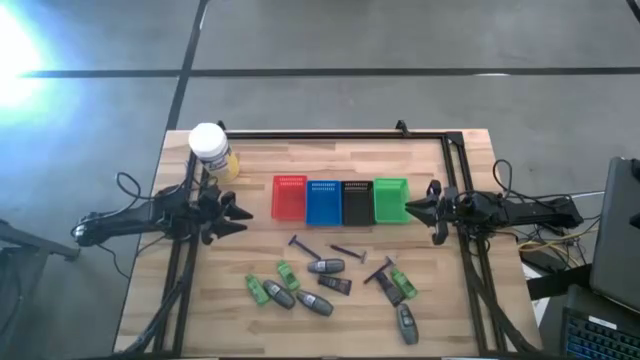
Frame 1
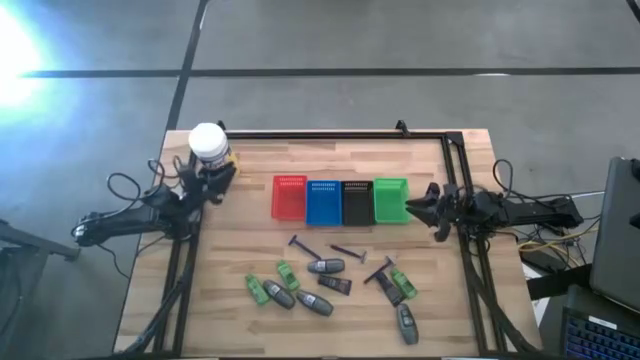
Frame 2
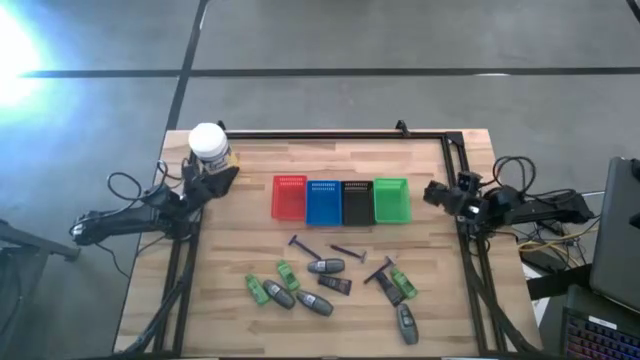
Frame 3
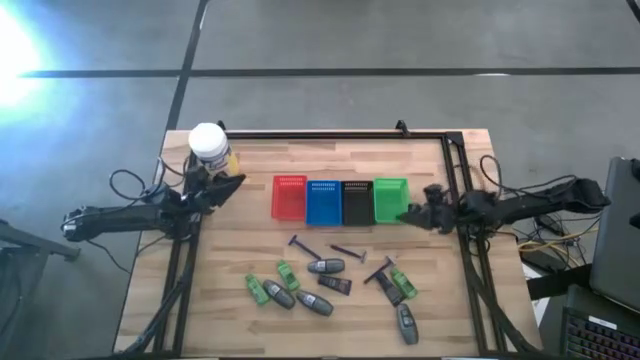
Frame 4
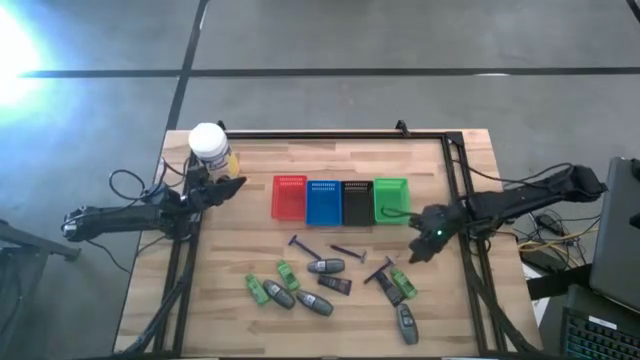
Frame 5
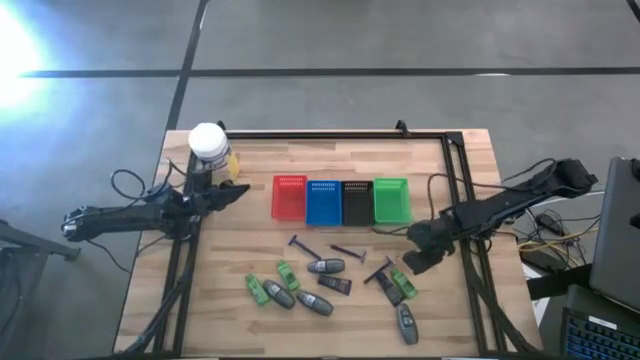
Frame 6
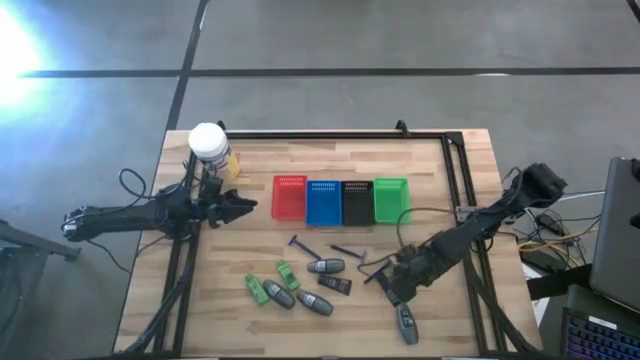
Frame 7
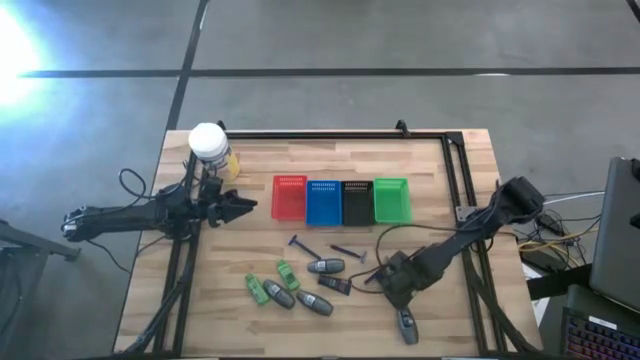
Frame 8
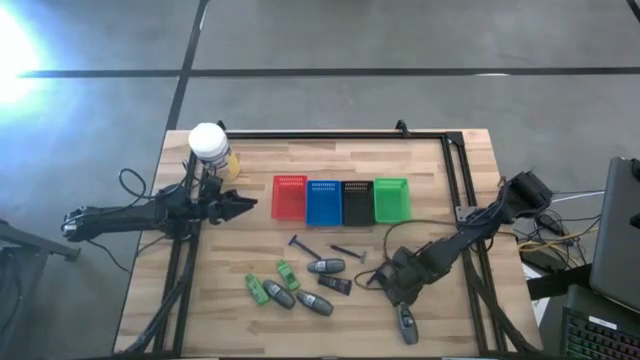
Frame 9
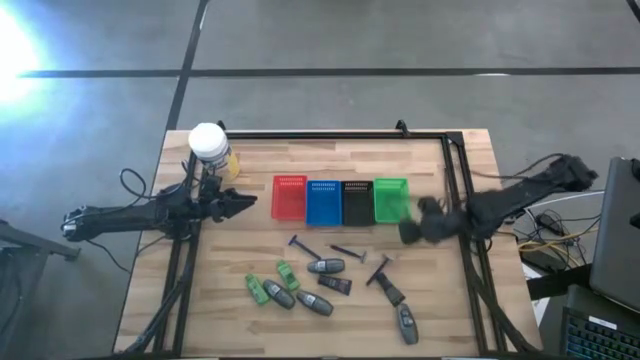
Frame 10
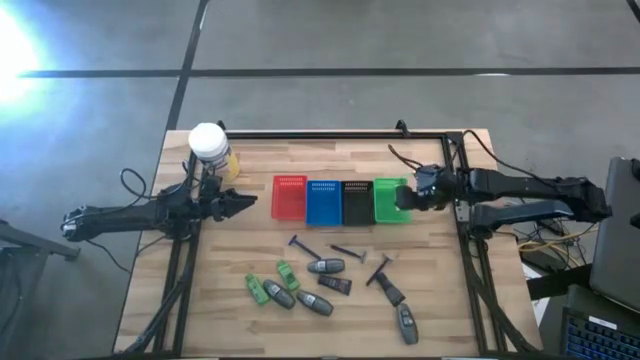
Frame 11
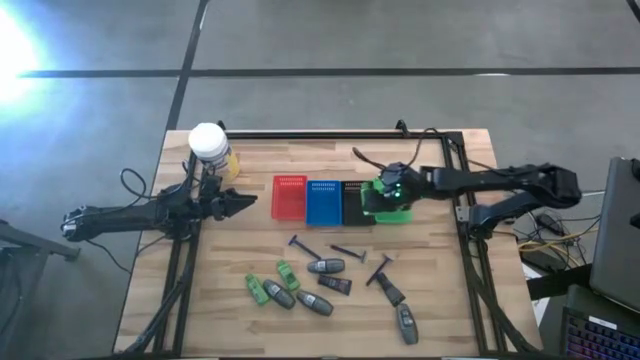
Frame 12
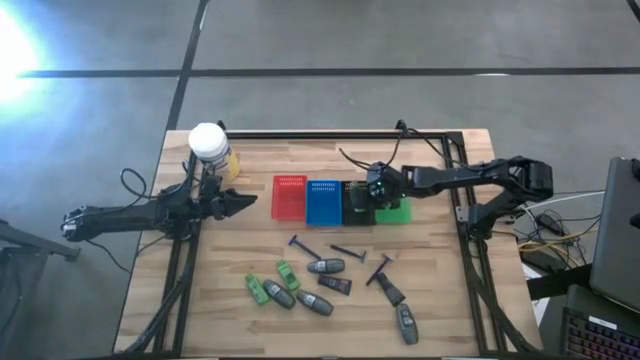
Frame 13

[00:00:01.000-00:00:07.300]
Task: Pick & Place Travel size toiletries
Put the green shampoo into the black basket

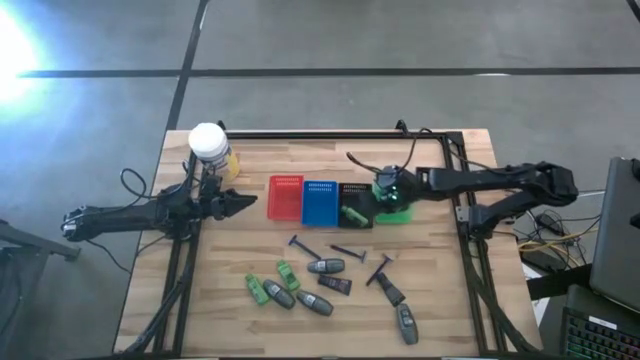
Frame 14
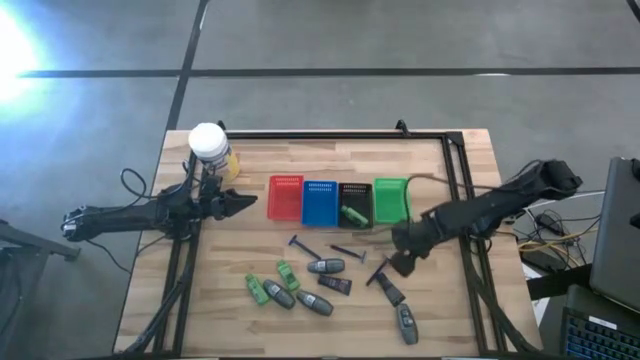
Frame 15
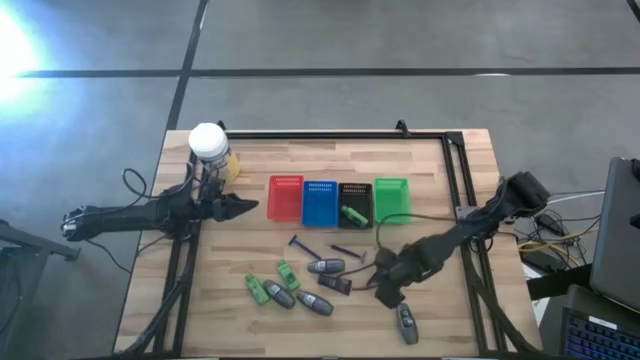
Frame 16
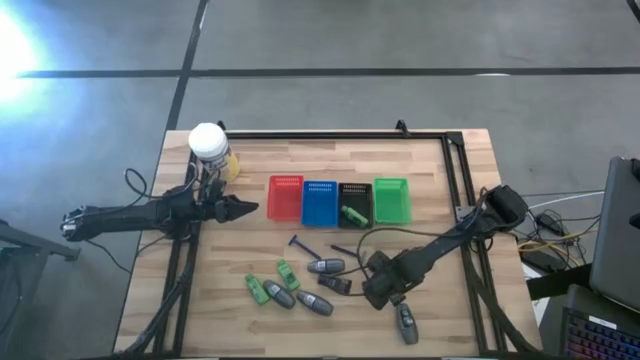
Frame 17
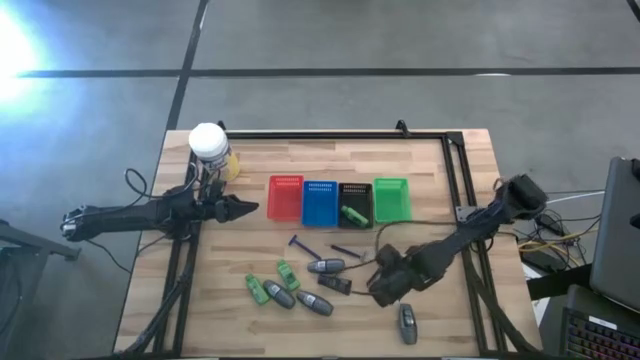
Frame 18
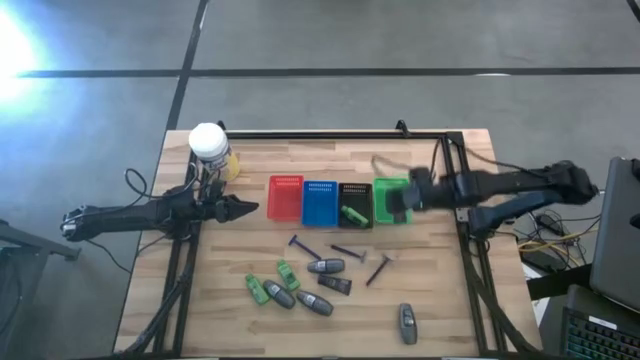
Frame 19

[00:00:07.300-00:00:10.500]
Put the blue shave cream into the green basket

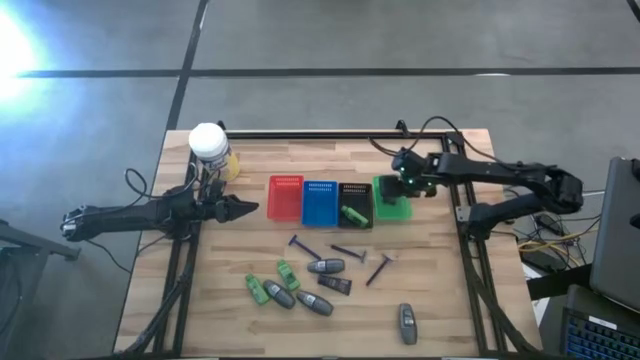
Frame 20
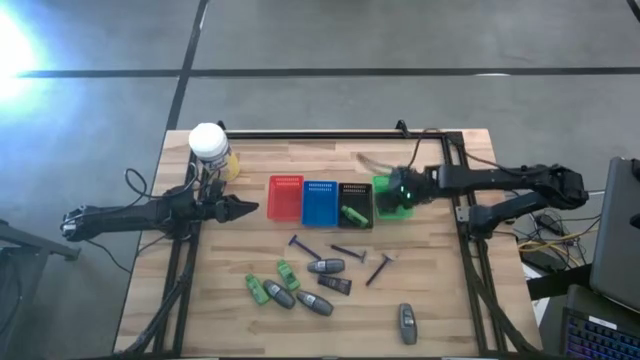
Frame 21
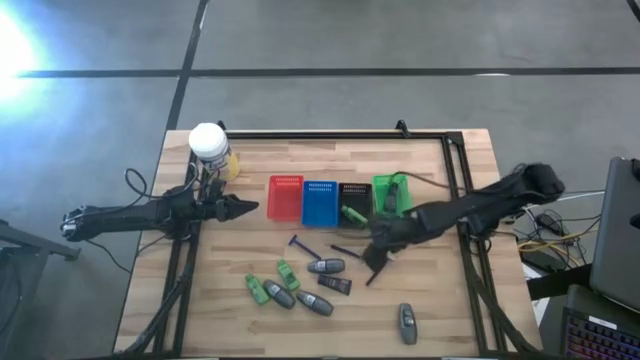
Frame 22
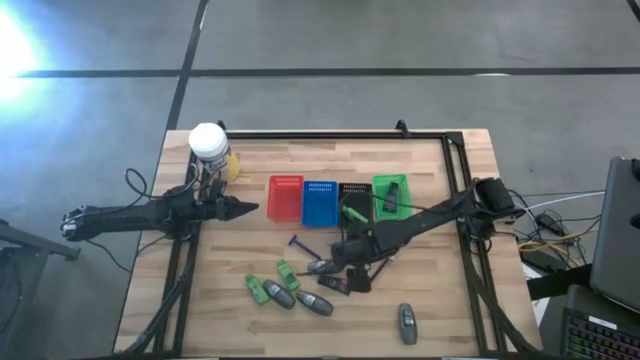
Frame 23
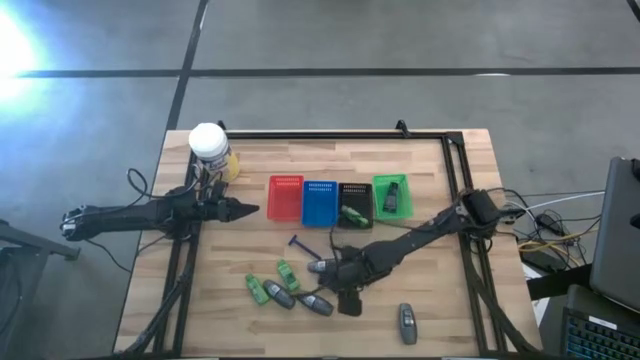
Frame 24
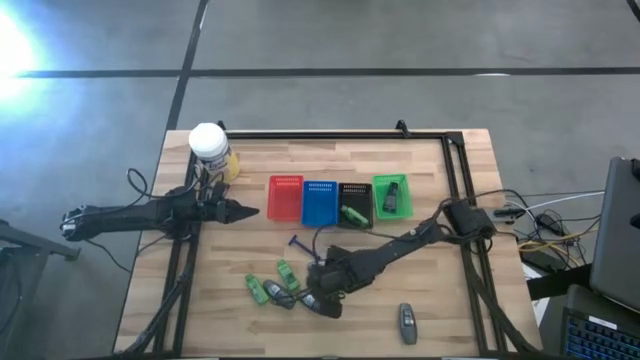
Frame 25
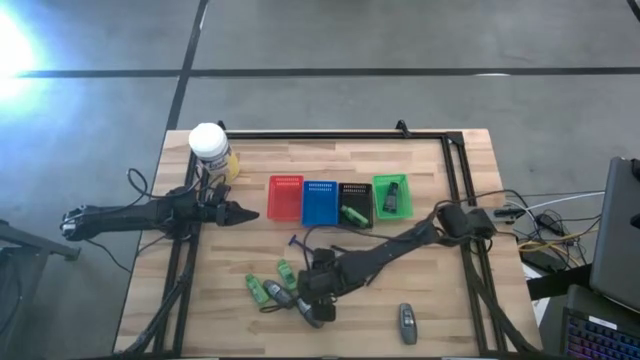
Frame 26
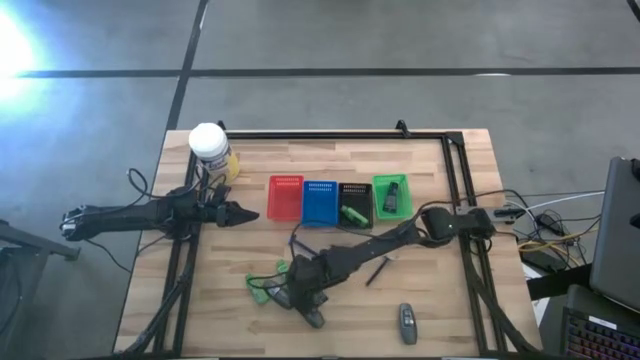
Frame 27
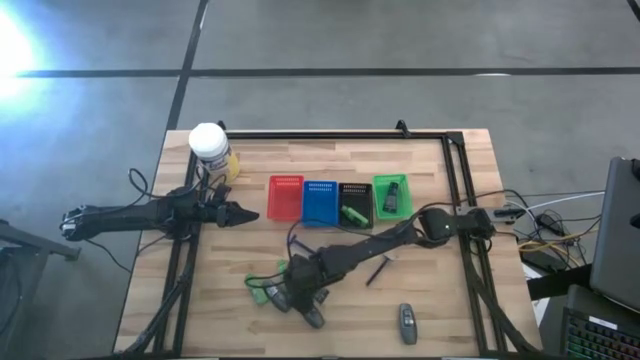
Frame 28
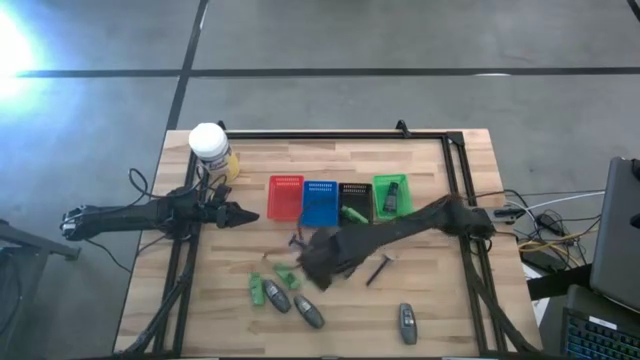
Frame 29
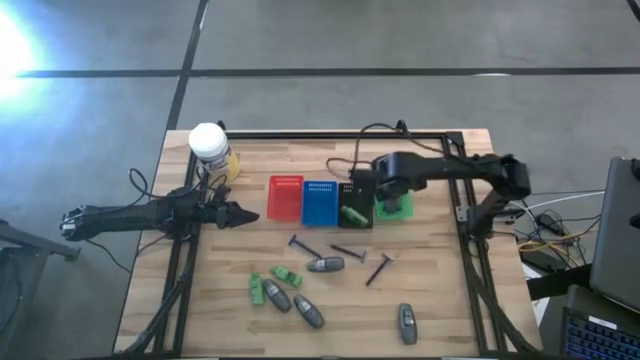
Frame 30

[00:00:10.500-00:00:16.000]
Put the blue shave cream into the green basket

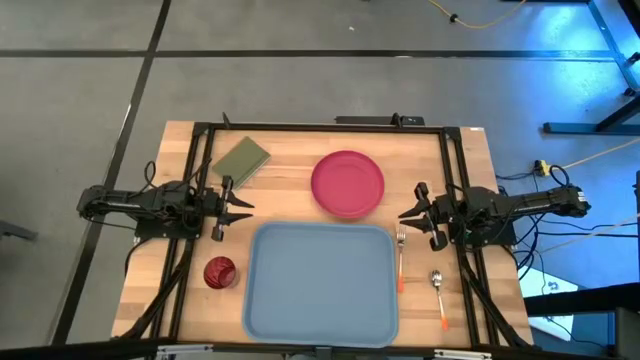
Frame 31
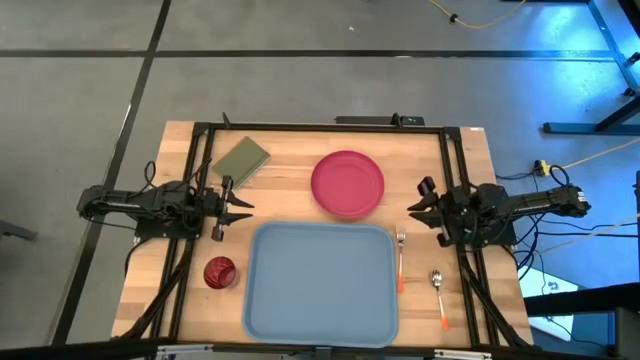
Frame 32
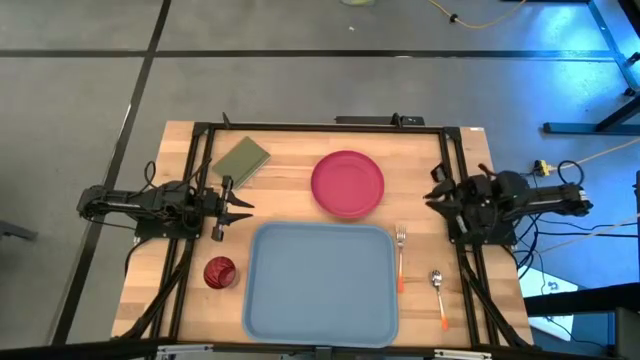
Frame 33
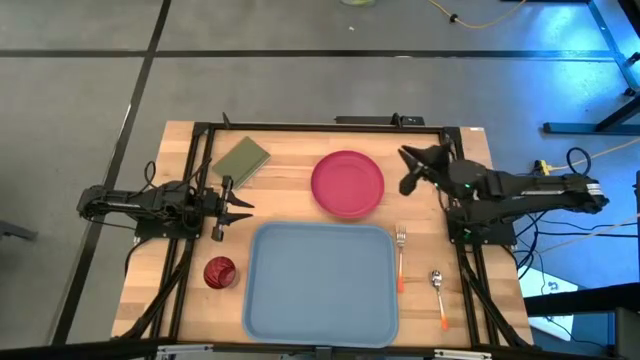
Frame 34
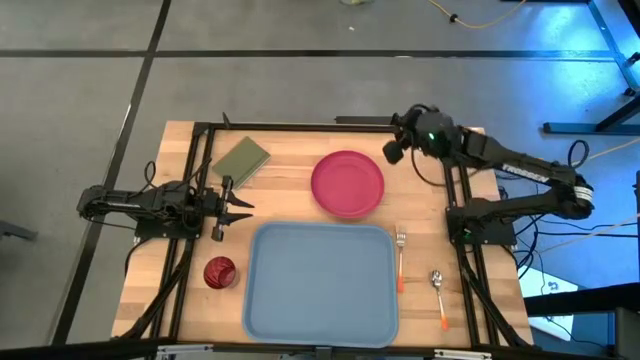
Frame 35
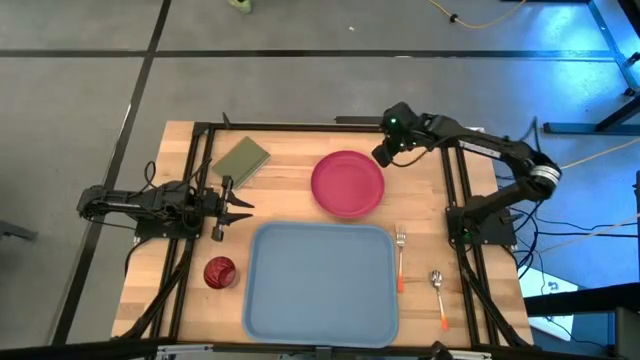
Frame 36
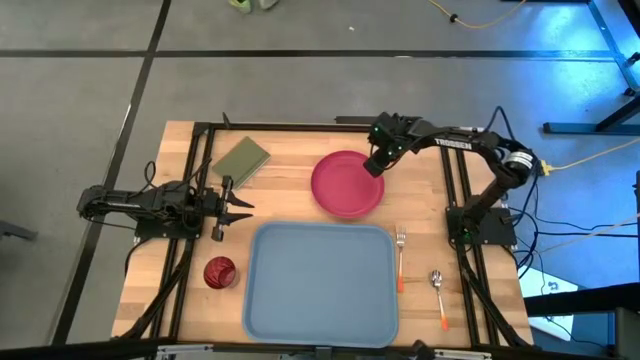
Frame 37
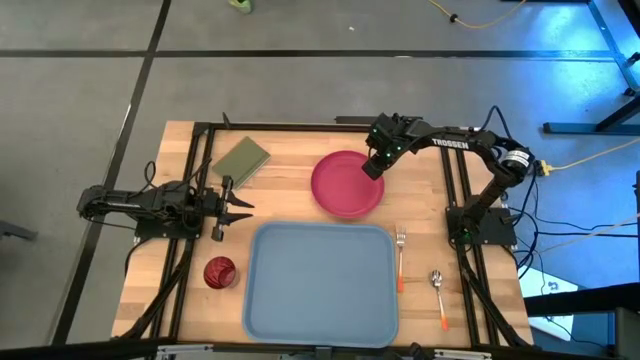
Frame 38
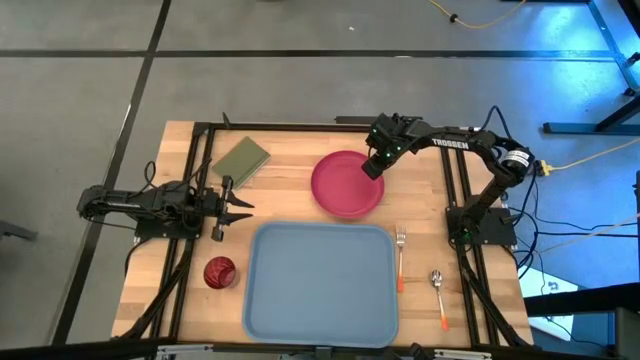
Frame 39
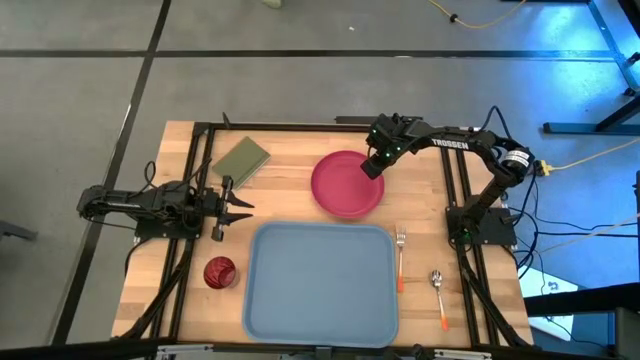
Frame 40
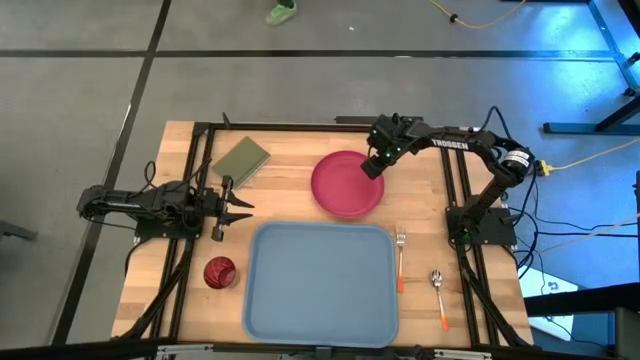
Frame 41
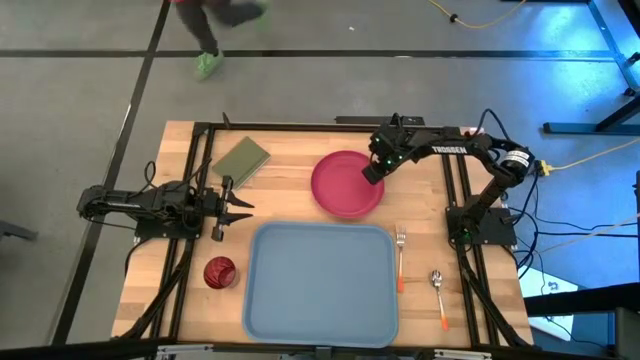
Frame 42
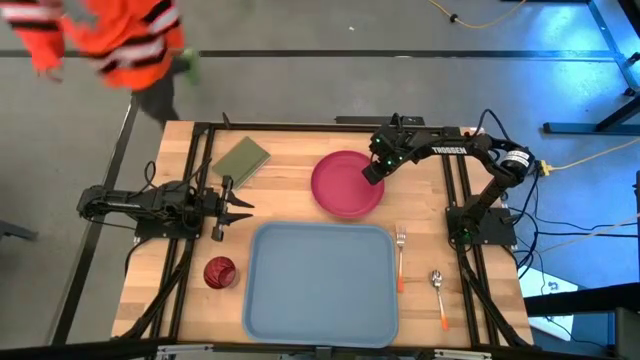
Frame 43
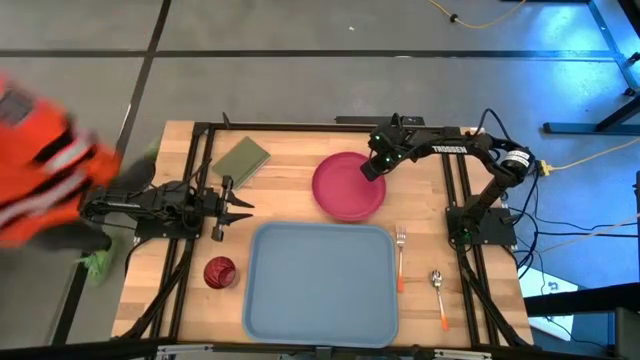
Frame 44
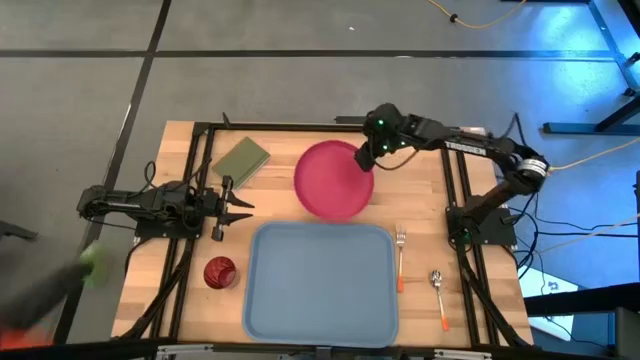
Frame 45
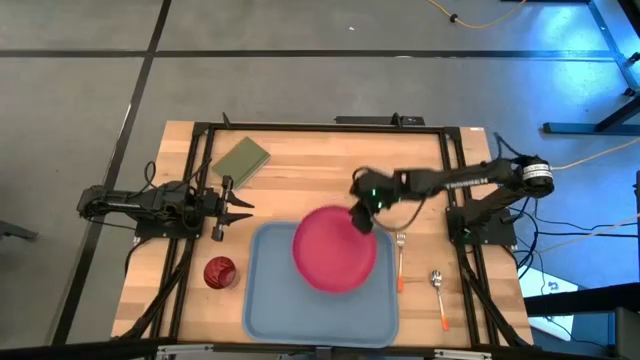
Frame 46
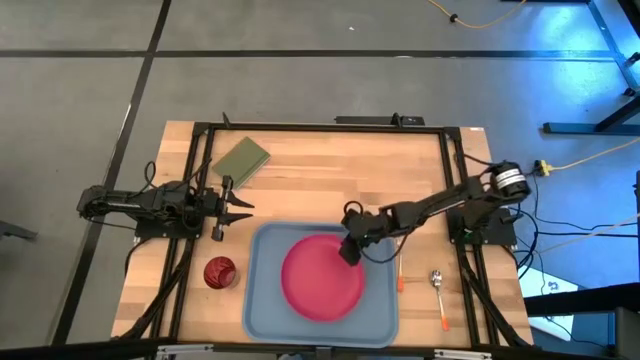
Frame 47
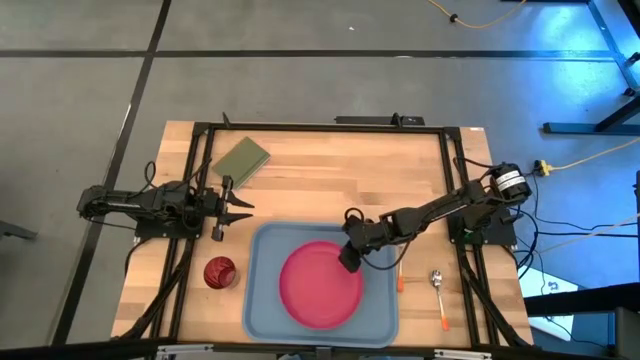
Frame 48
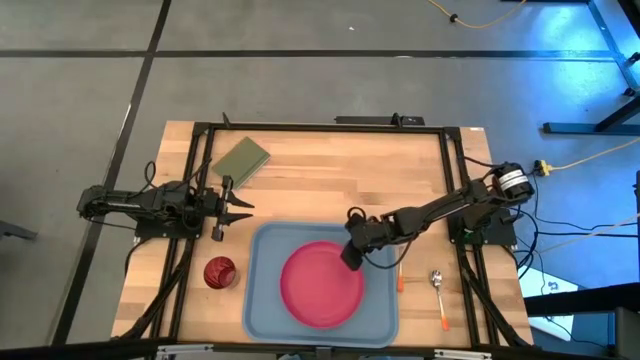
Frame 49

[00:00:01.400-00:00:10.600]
Task: Pick and place plate/cup/fork/spoon on tray
Put the pink plate on the blue tray
